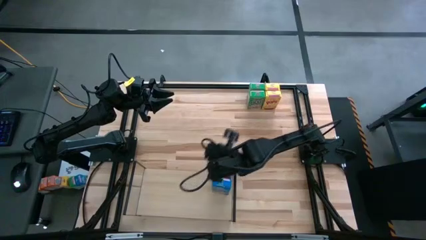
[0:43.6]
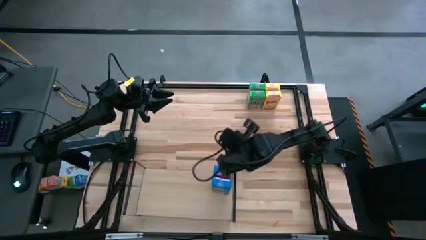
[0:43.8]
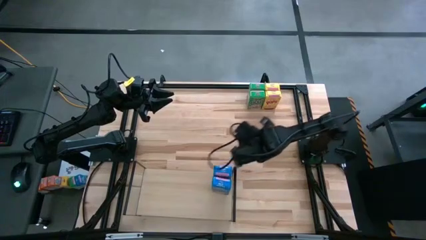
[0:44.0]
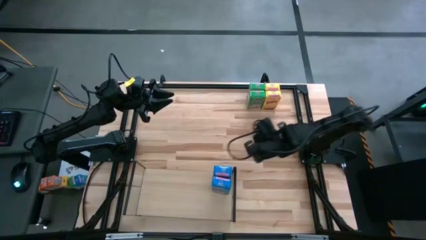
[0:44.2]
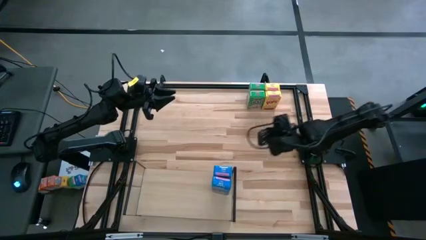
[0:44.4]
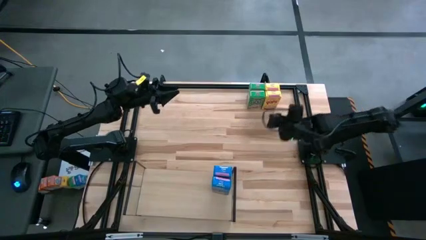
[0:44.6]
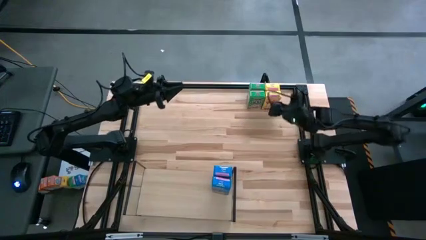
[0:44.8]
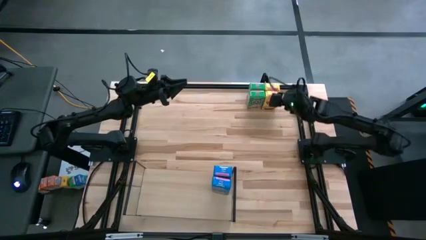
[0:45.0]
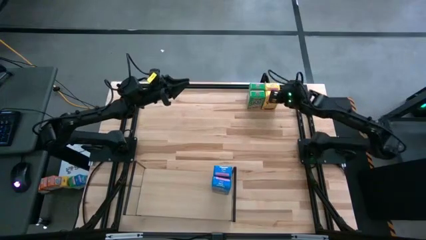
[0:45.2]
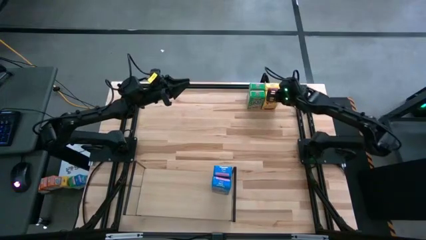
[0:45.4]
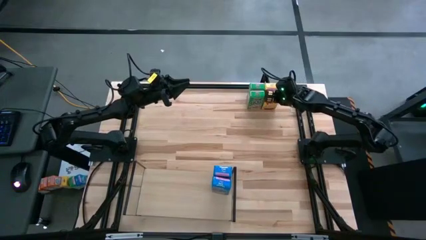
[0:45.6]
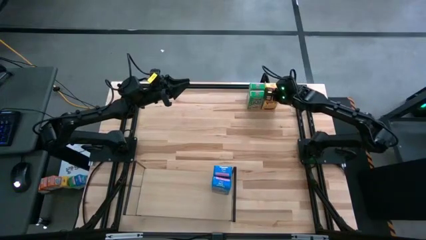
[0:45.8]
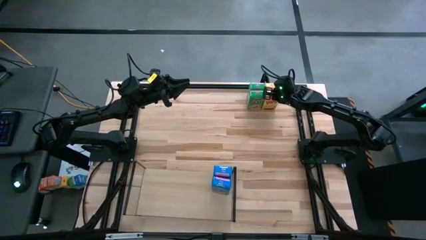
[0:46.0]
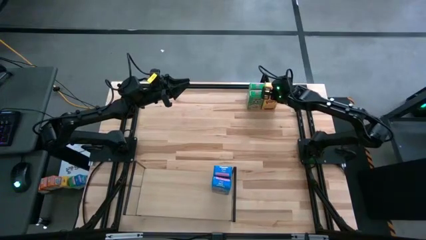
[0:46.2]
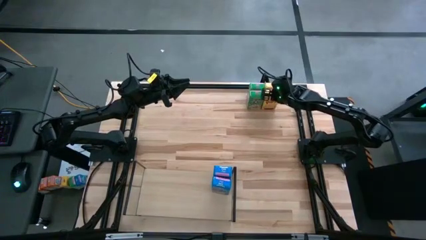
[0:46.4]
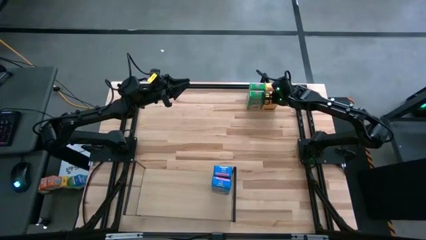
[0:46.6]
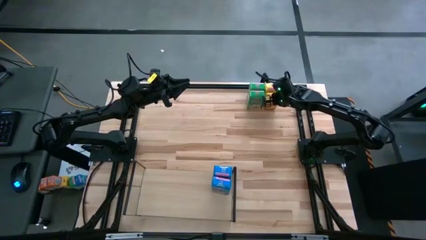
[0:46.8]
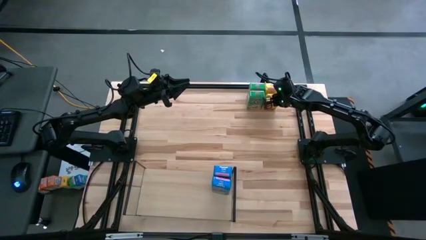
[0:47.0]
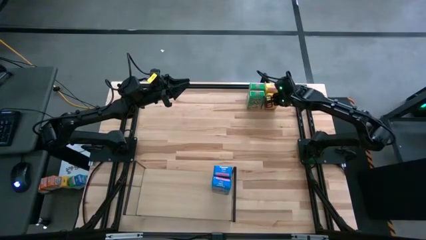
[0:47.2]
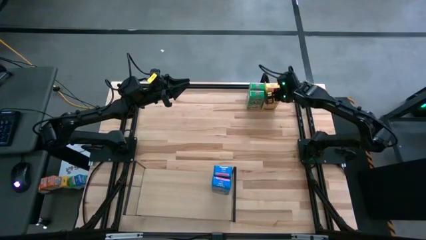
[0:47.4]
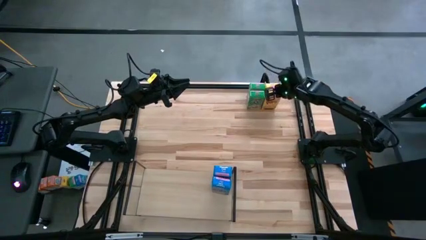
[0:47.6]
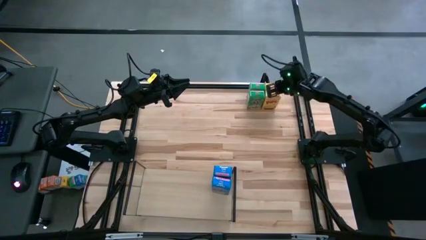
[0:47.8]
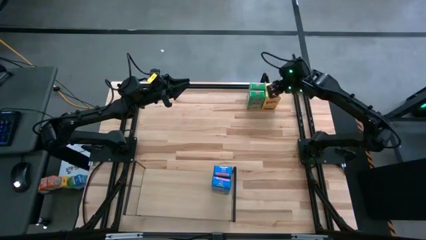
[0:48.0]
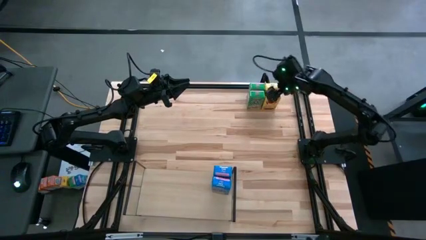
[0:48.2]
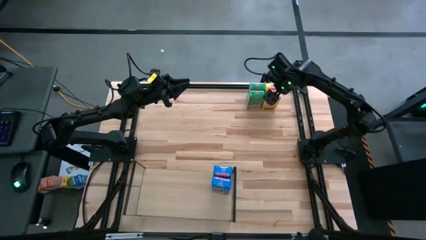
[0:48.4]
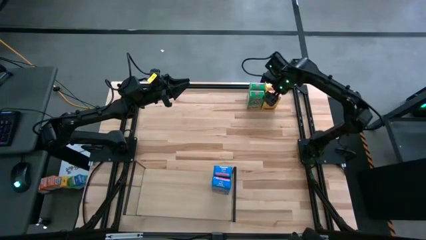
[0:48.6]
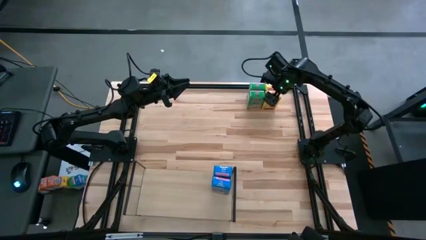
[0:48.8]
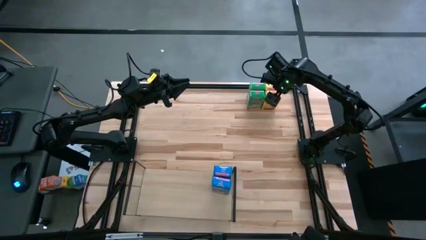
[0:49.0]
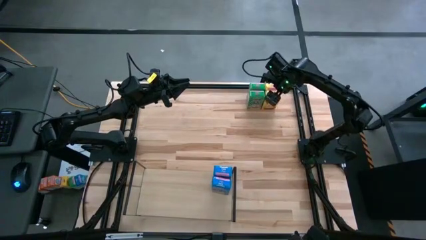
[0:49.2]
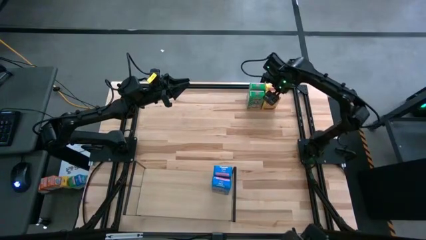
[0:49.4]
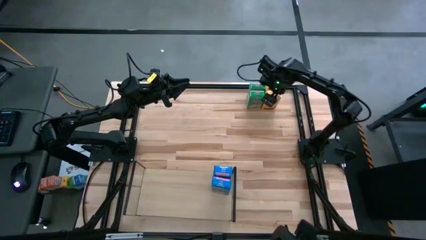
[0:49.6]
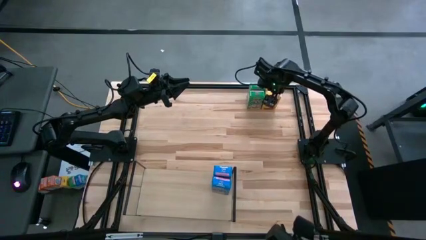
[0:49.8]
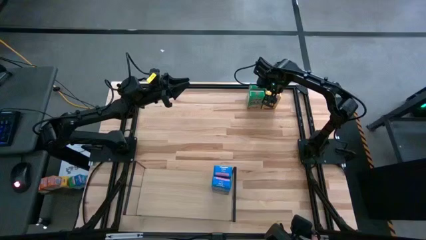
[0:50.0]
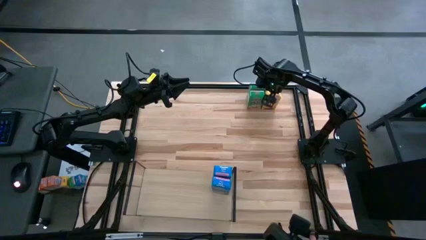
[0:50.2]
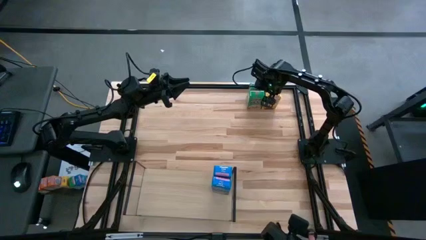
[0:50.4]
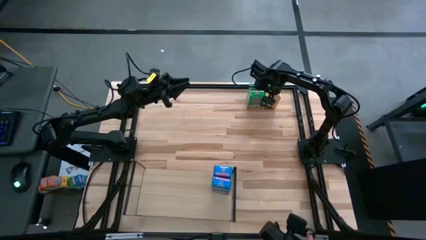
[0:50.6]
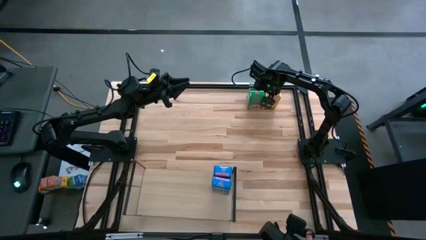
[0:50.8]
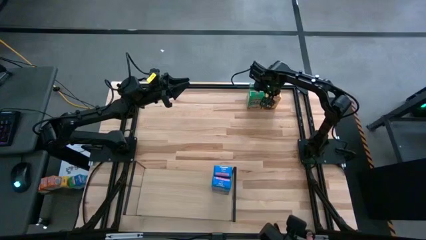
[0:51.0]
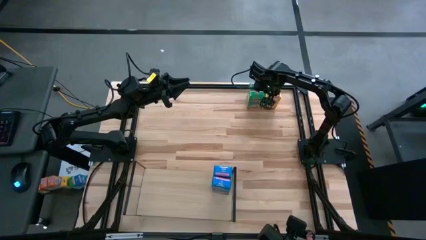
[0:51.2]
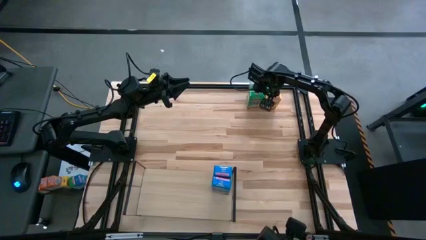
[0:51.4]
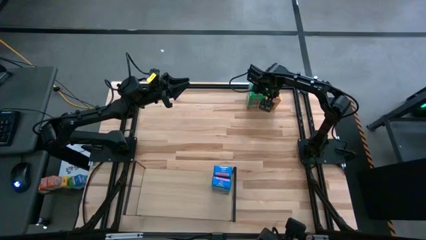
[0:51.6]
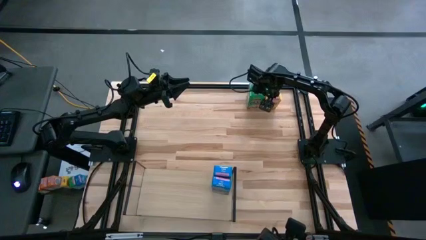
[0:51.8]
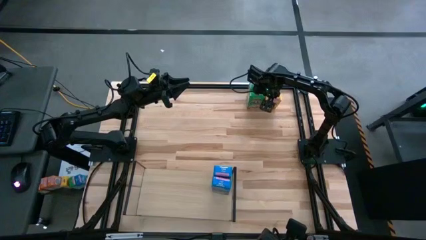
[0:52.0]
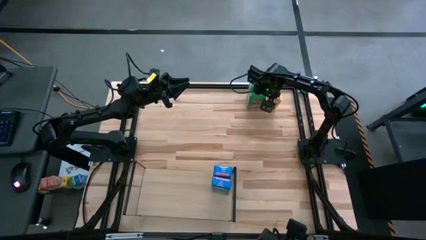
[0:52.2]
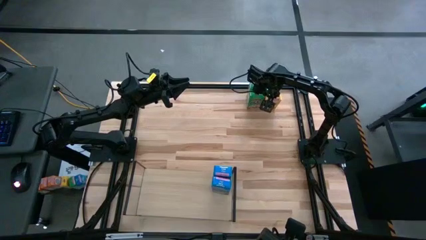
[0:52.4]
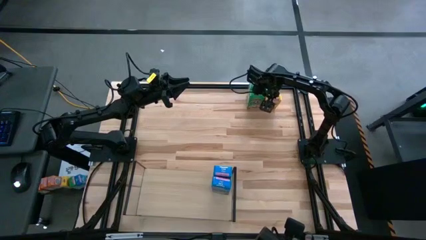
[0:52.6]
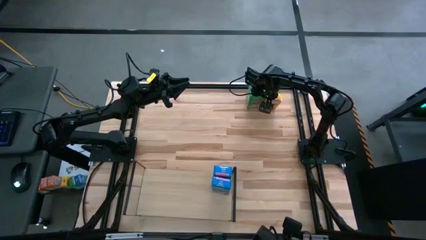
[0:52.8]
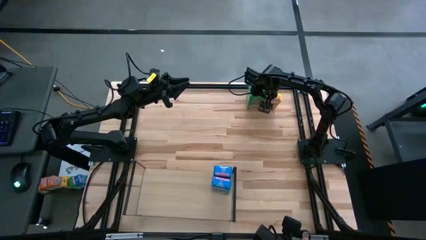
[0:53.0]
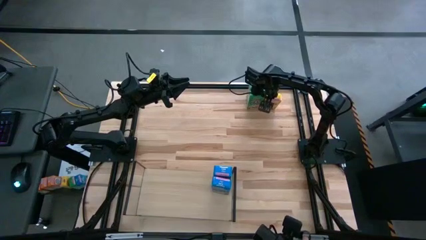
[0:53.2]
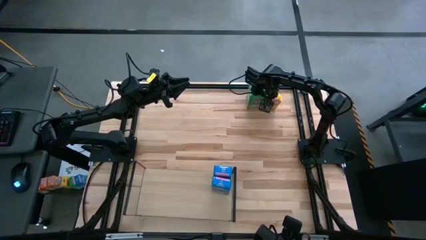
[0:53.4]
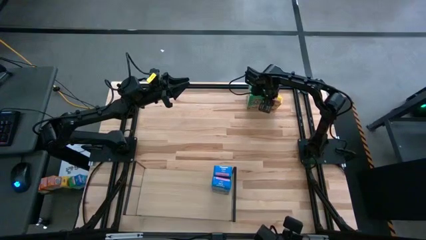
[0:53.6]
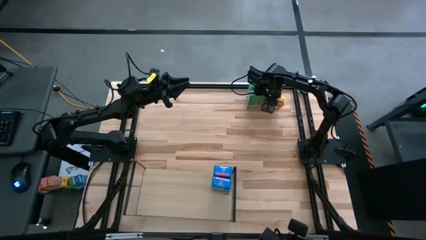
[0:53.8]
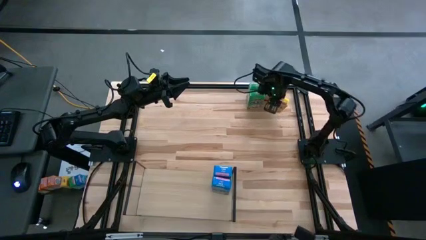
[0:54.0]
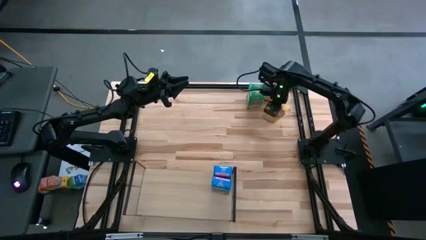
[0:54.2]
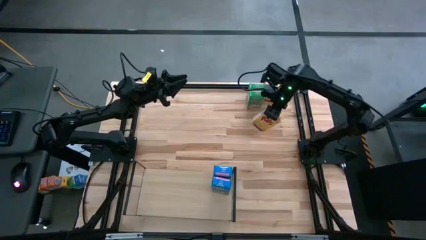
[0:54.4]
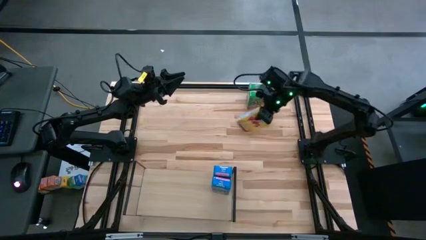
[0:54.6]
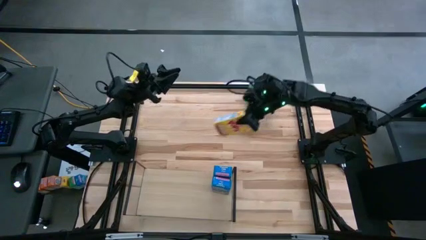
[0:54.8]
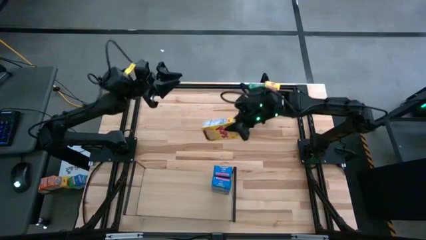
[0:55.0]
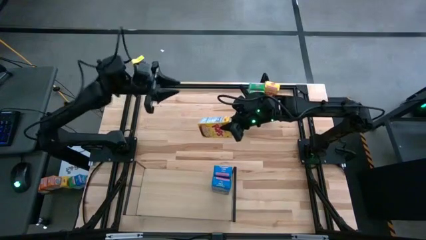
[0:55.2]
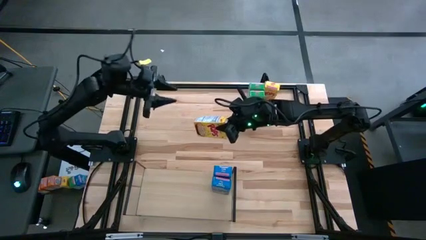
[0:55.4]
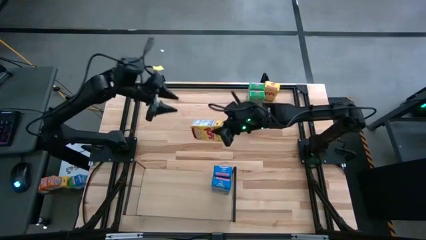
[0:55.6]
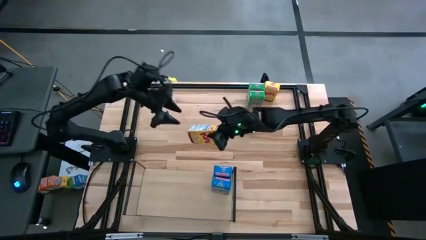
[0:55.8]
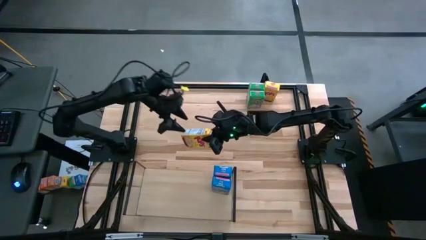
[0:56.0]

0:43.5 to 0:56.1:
Task: Stack cereal on shelf
Put the bottom yellow cereal box on the shelf

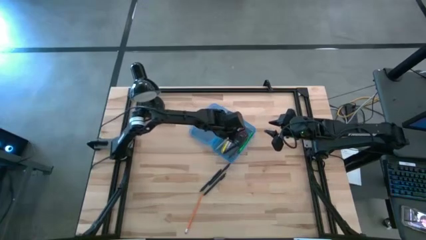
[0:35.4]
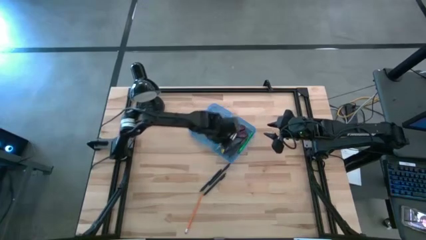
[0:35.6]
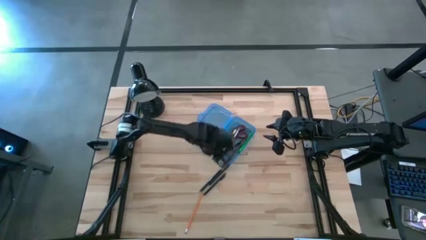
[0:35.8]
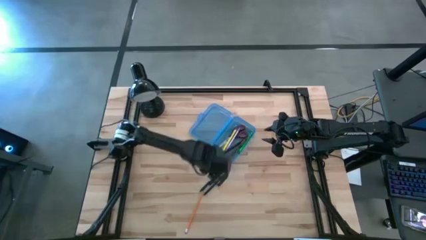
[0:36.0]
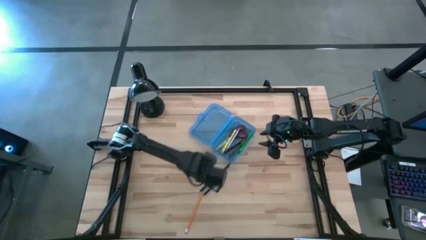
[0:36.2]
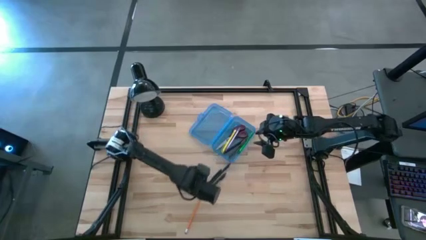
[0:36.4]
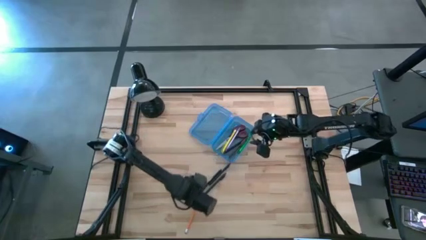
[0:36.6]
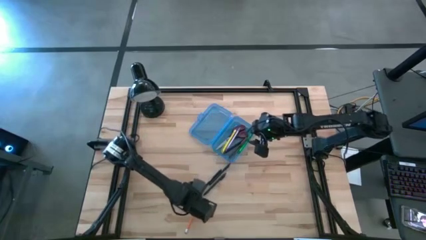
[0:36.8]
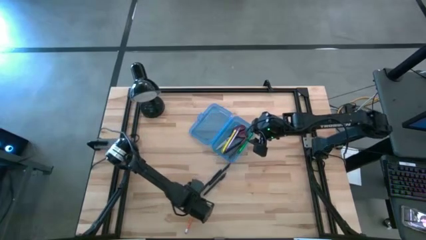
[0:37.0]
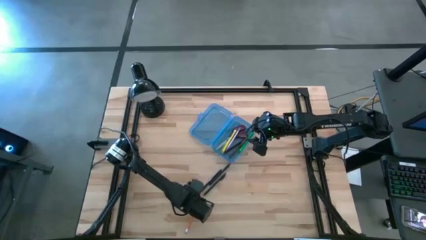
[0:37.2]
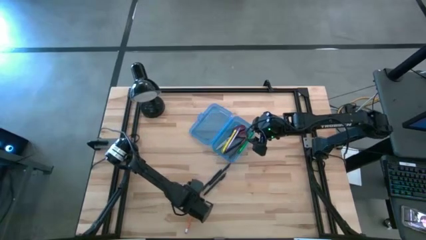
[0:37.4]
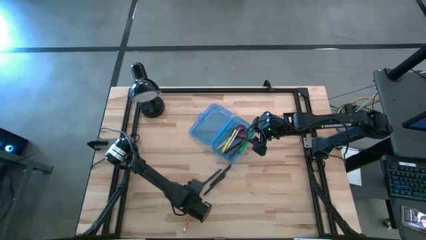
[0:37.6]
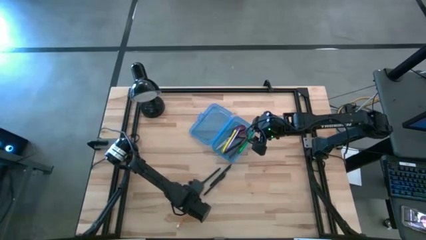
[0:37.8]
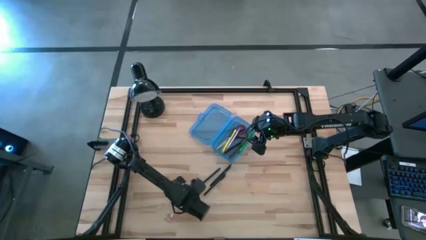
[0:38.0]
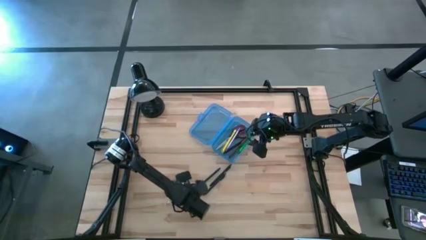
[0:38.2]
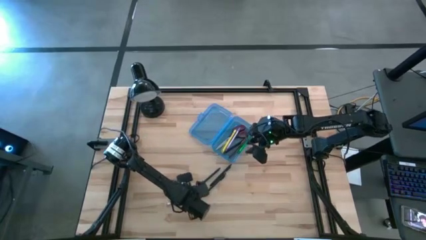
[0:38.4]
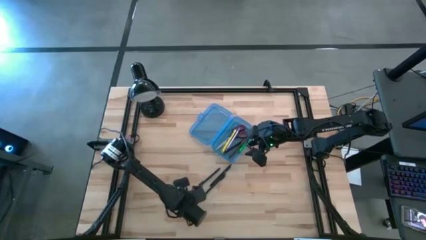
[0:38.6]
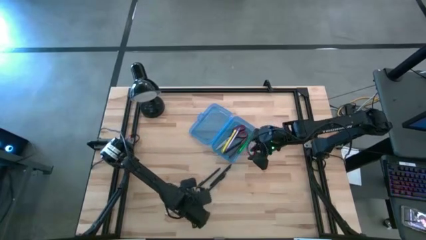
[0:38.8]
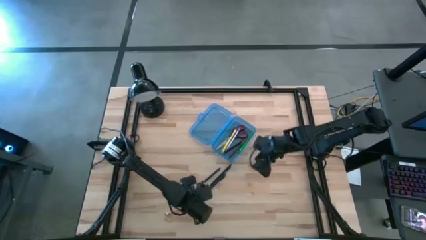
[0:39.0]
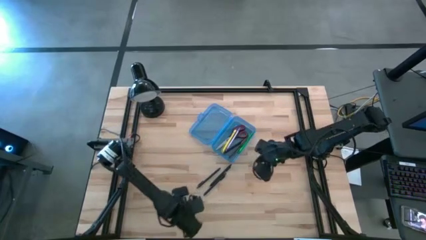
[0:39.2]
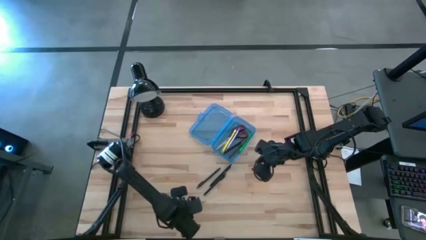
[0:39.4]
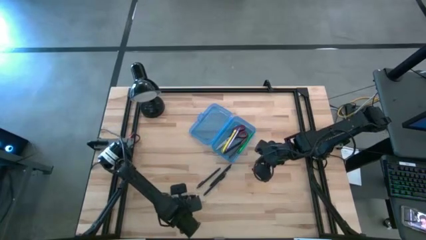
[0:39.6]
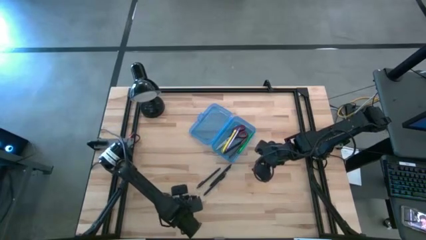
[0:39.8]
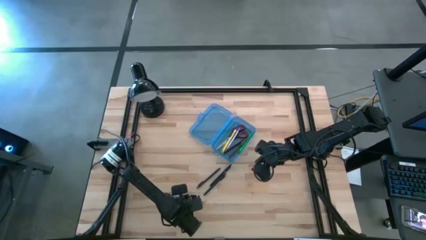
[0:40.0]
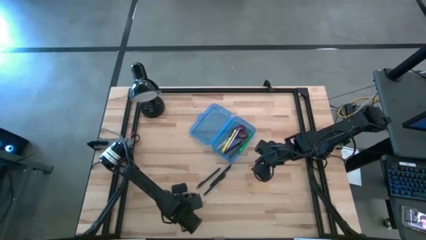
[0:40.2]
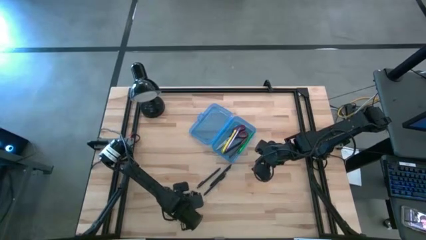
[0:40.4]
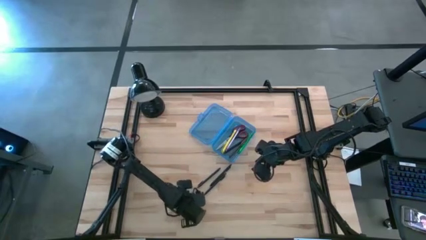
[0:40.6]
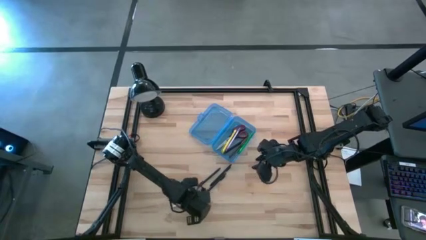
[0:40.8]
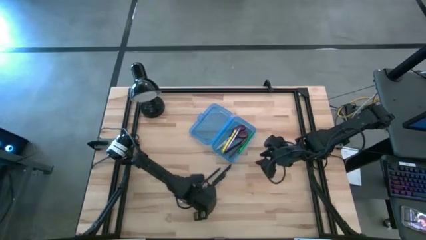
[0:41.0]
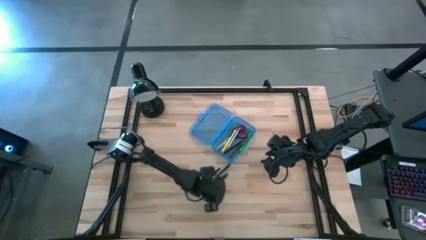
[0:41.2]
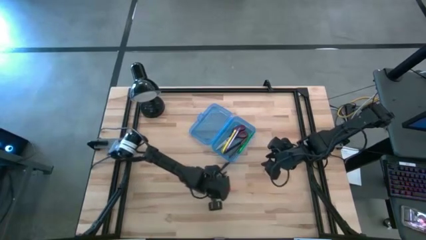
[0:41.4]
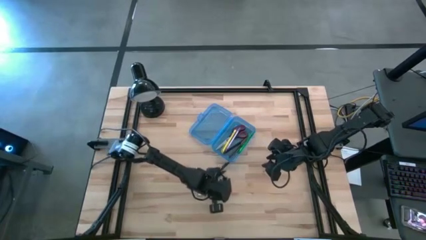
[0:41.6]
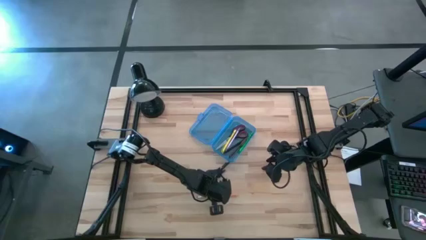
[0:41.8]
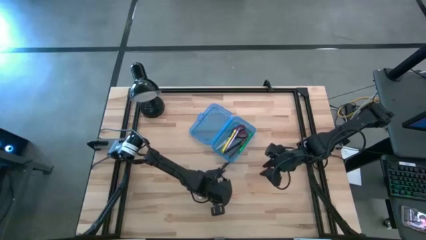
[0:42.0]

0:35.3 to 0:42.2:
Task: Pick & place school supplies into a supply box
Put the orange pencil into the supply box
